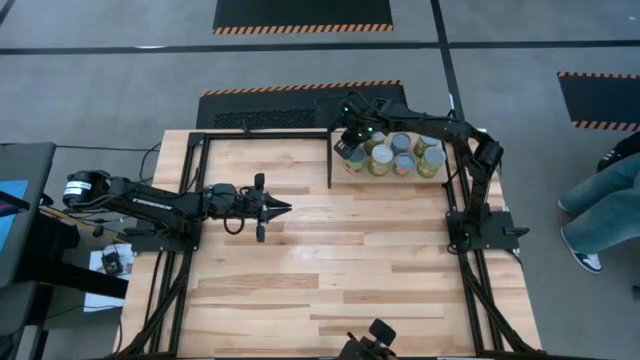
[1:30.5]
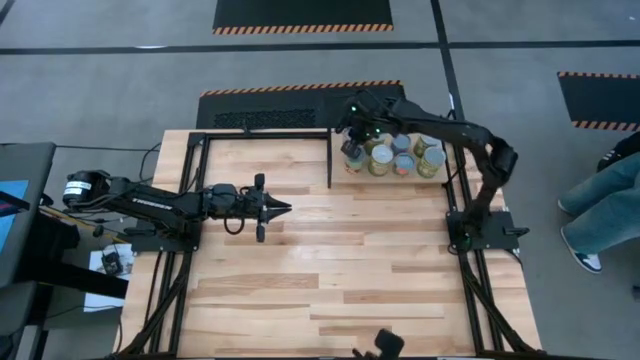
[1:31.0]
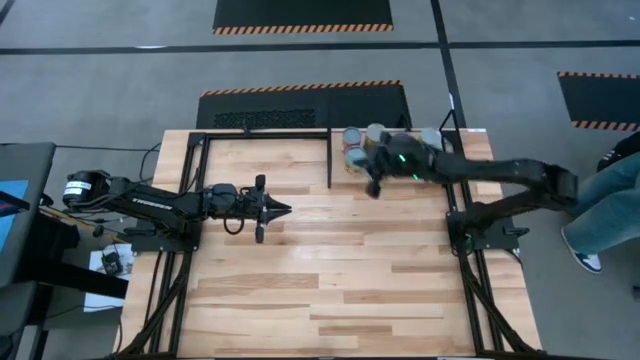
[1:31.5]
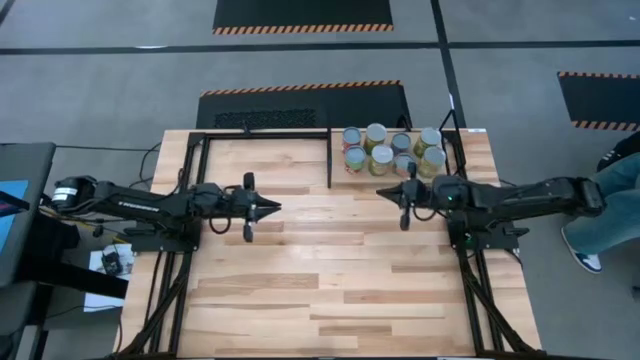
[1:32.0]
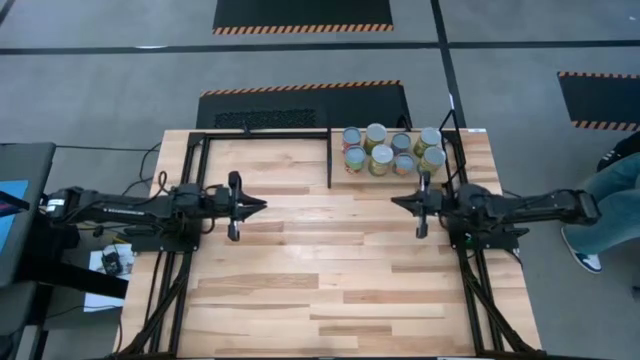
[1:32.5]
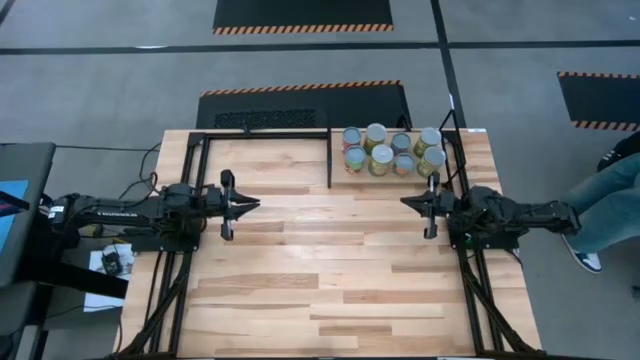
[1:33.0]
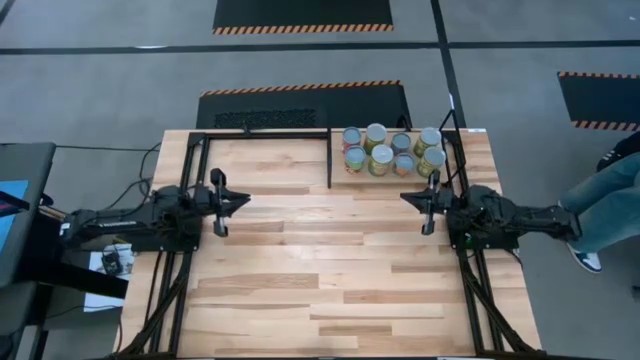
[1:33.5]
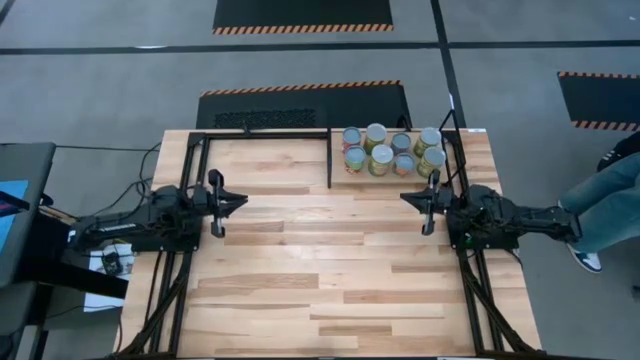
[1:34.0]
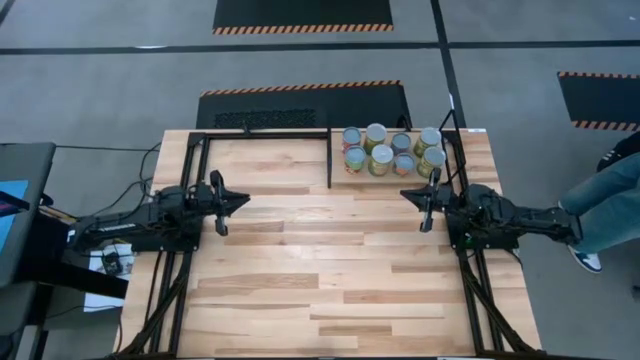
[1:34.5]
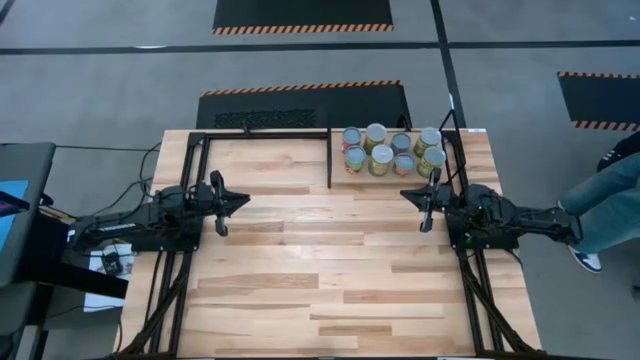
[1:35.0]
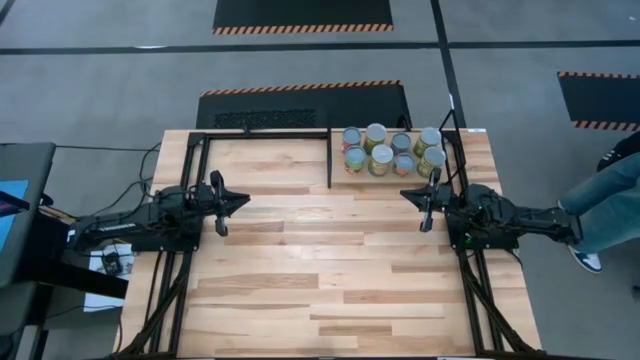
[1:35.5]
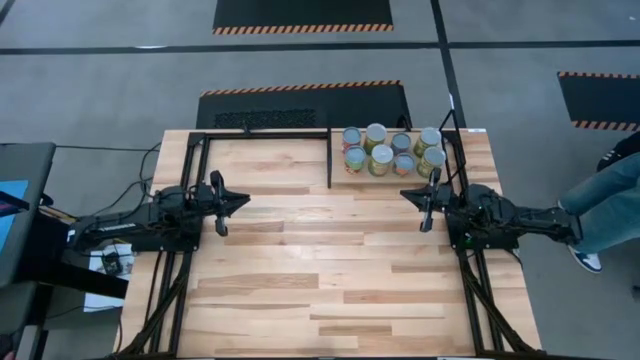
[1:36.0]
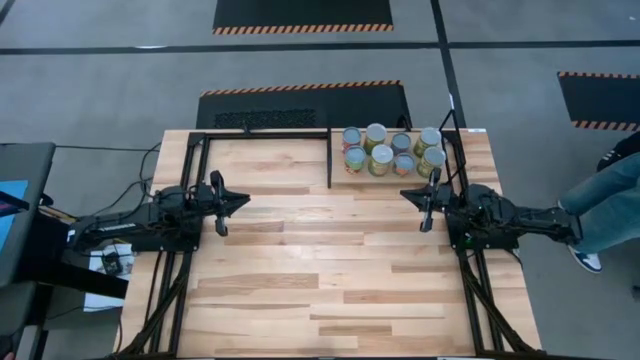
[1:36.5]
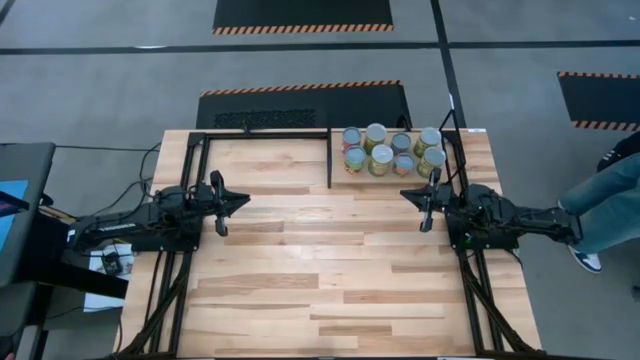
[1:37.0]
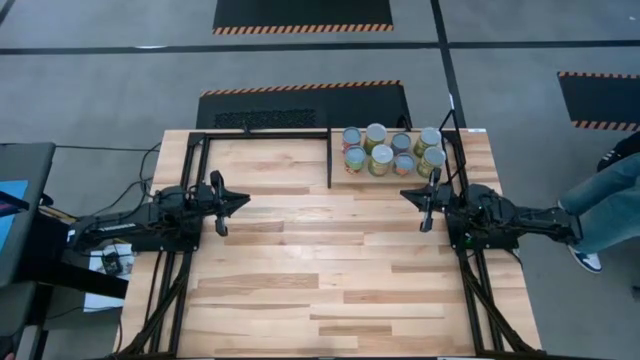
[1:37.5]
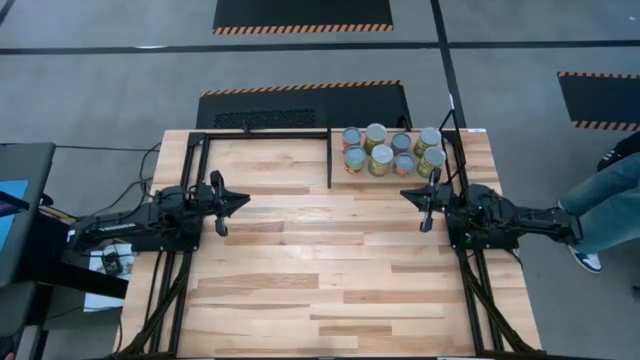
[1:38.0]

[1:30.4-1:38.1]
Task: Pick and place cans onto a shelf
Return to home position

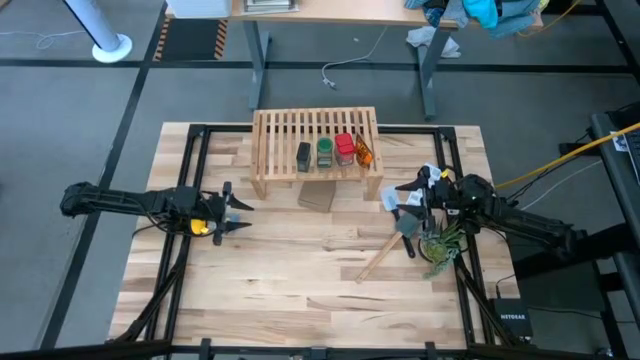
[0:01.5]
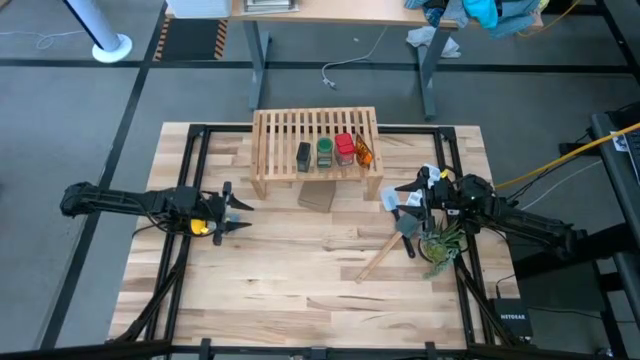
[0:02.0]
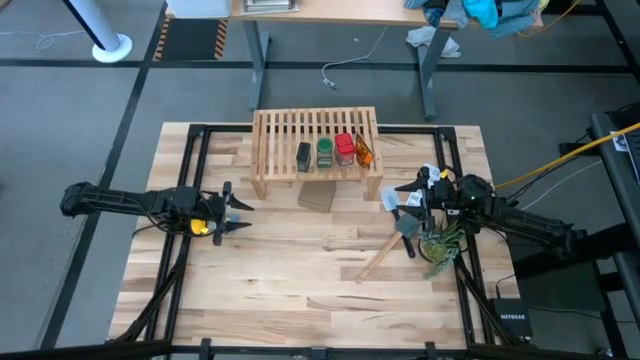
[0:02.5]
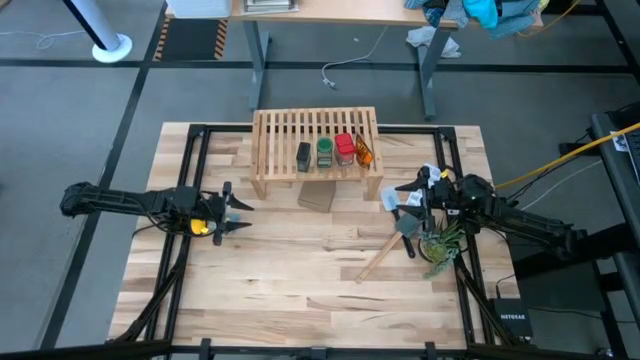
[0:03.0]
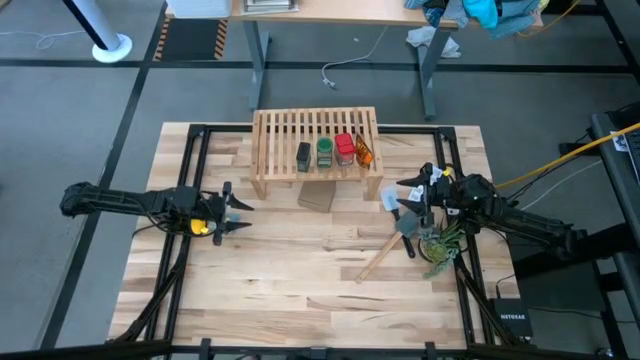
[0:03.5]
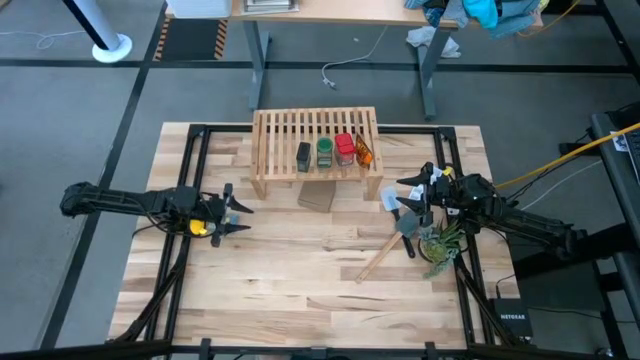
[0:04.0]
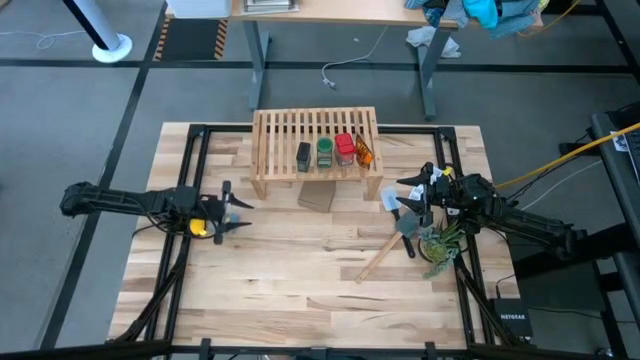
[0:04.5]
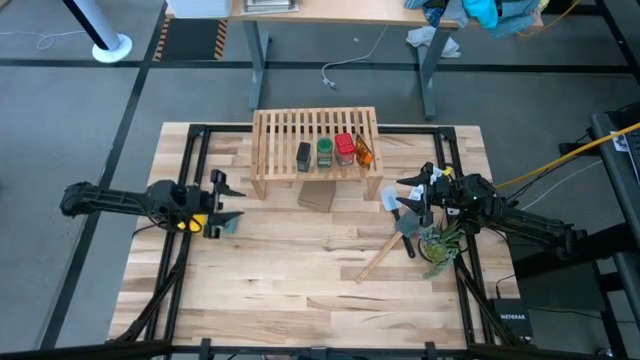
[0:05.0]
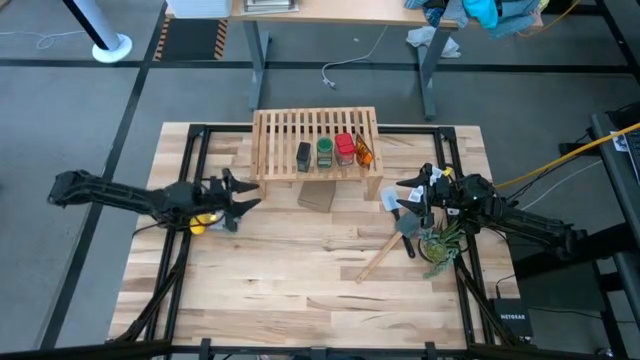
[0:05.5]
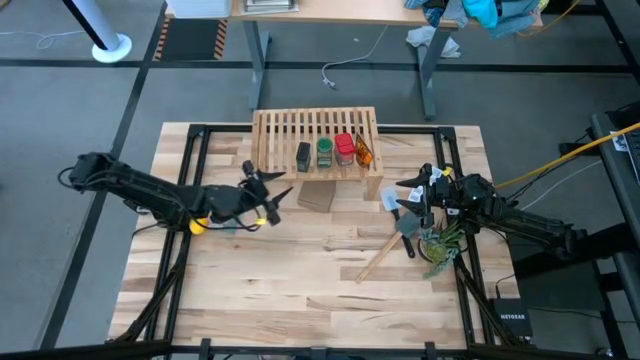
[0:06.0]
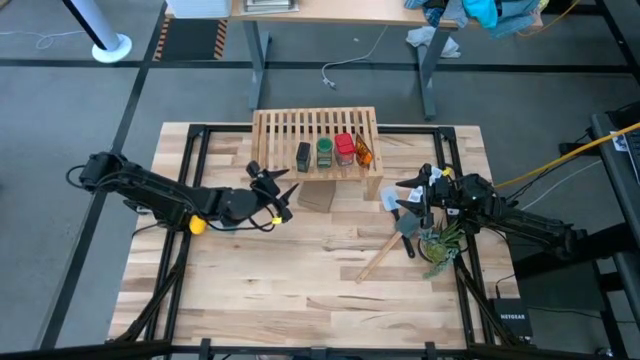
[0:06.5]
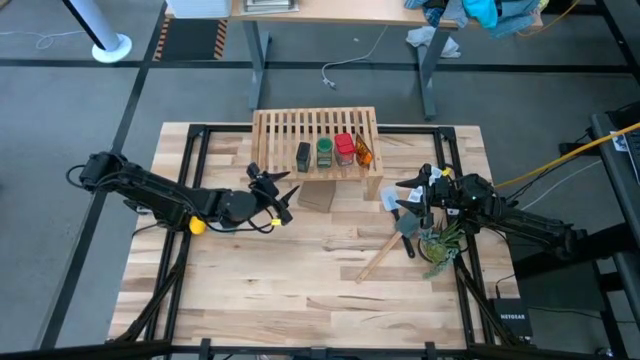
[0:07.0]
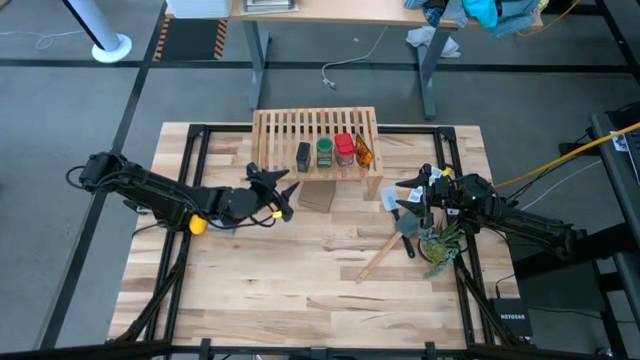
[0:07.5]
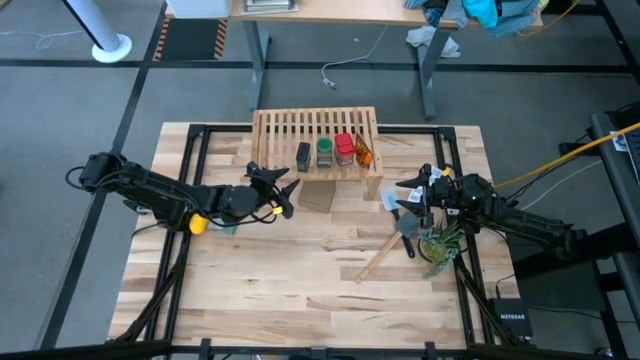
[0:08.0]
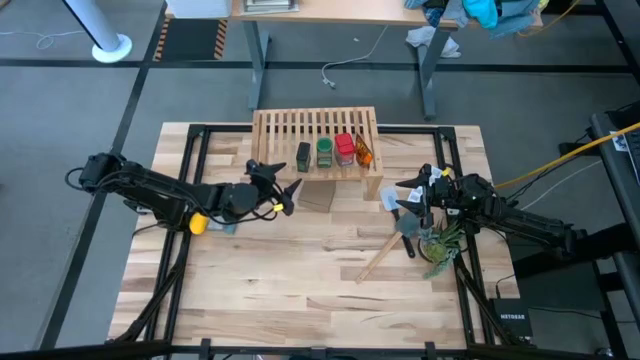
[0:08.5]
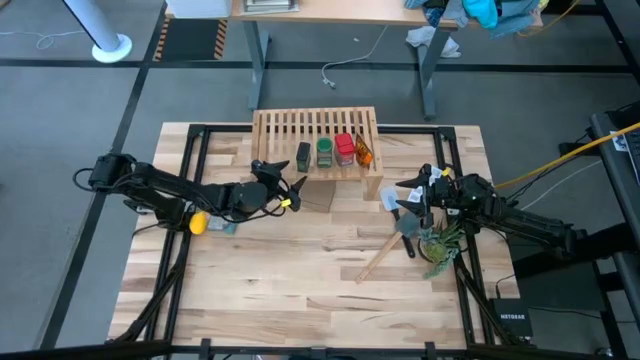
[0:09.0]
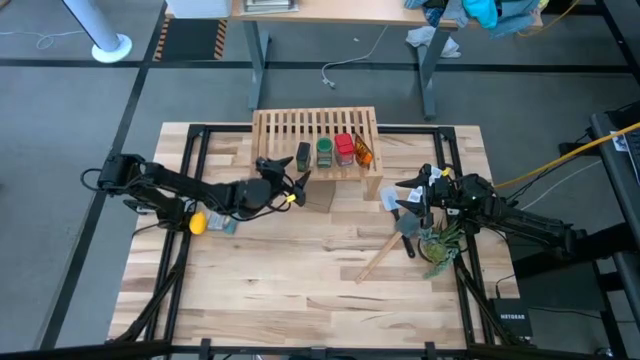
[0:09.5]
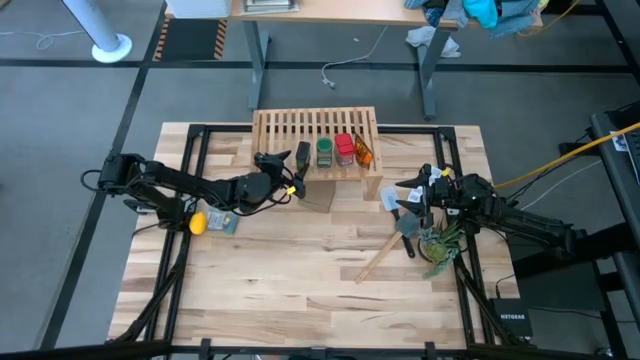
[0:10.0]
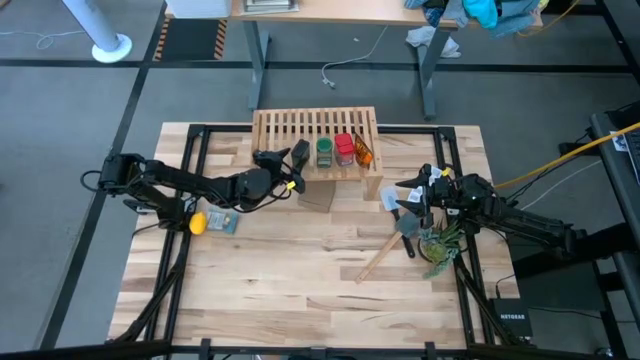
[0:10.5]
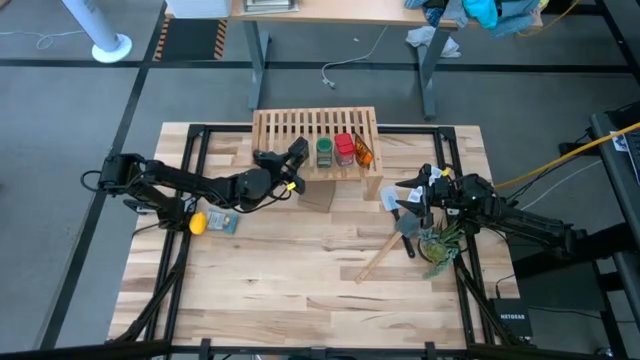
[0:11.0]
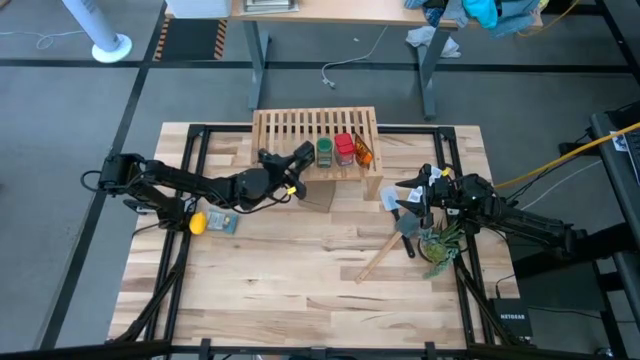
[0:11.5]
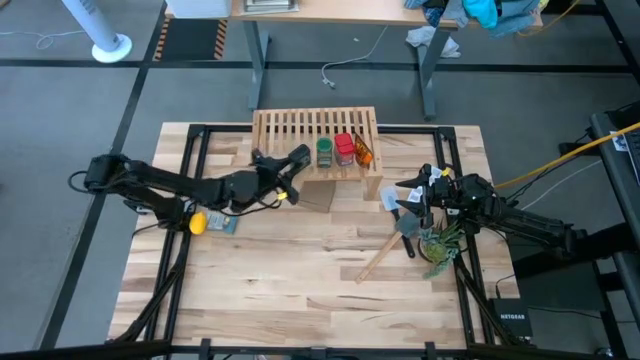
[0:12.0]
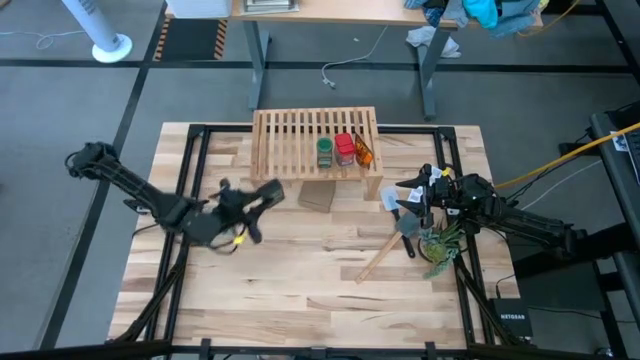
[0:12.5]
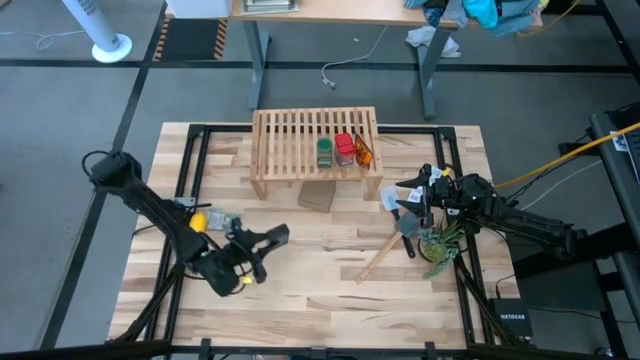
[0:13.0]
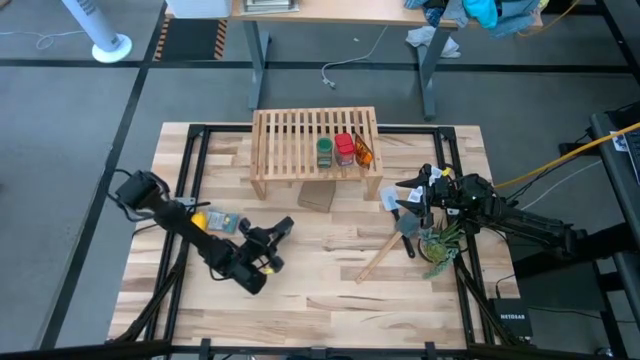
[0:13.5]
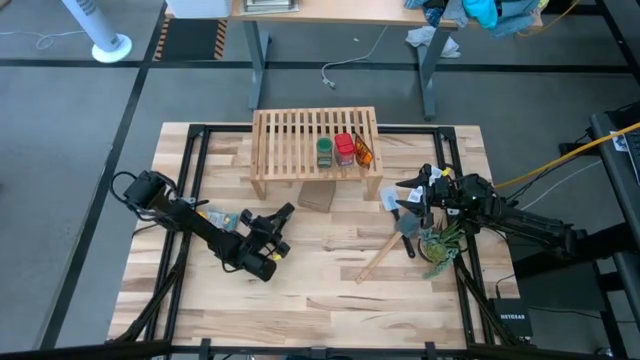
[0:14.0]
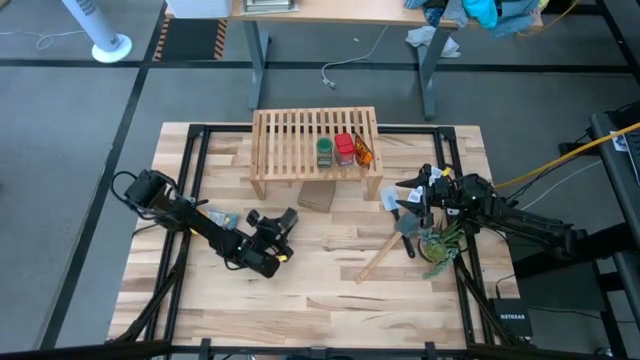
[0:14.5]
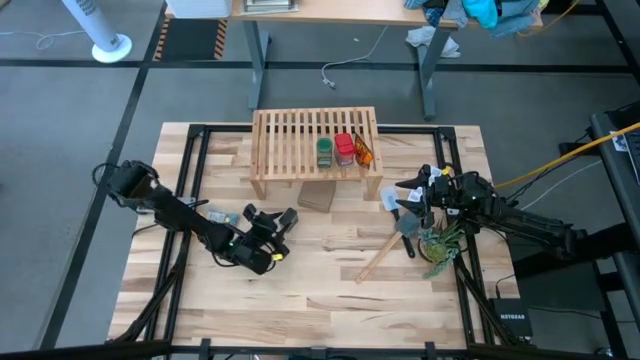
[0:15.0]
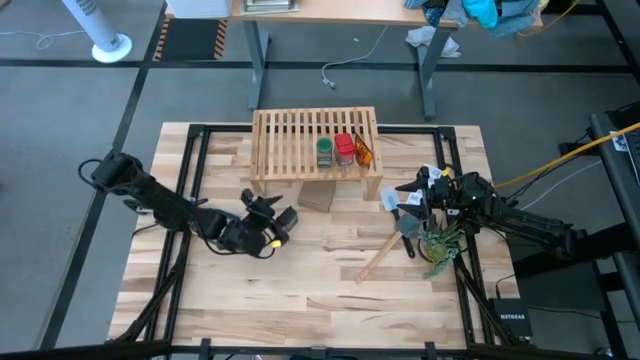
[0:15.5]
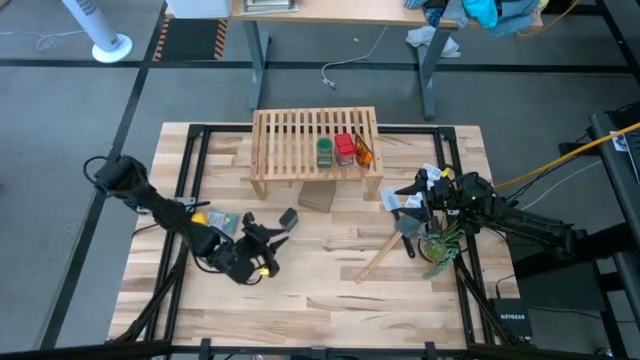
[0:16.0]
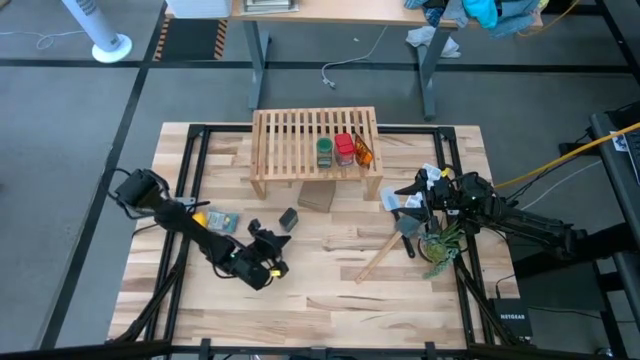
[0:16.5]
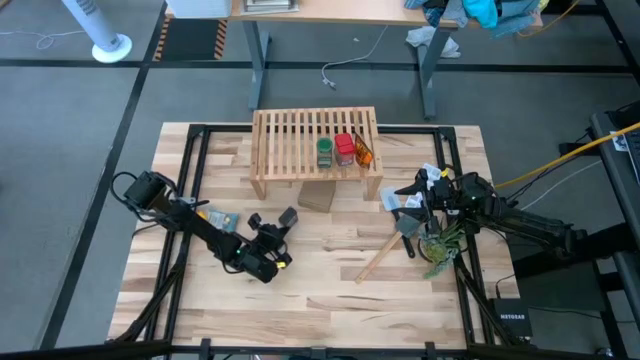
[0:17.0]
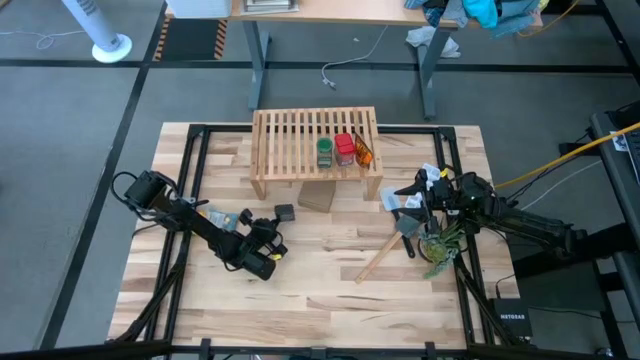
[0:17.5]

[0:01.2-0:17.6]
Task: Shelf spices
Remove the black seasoning can from the shelf
